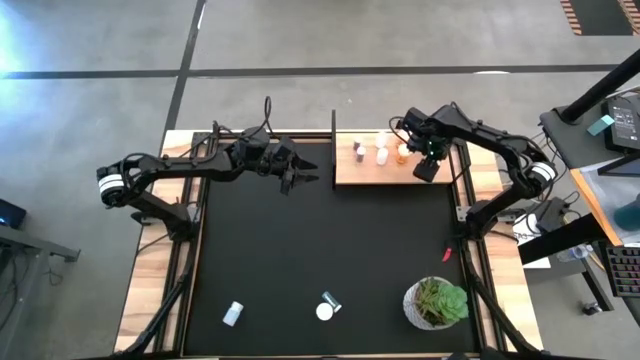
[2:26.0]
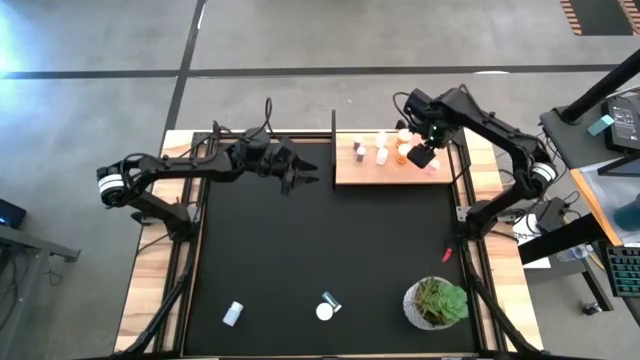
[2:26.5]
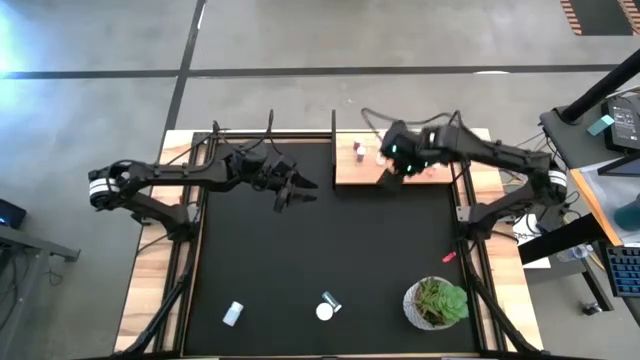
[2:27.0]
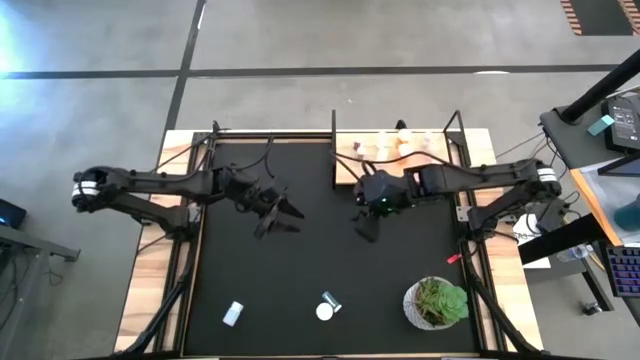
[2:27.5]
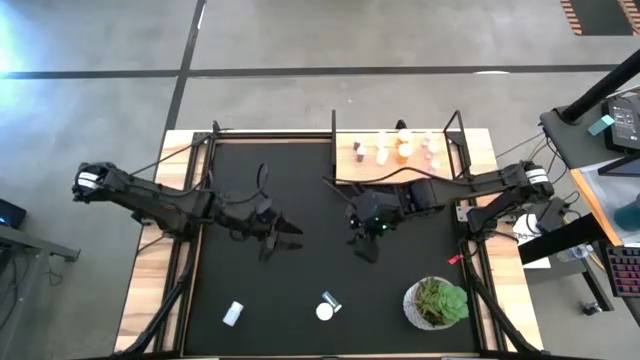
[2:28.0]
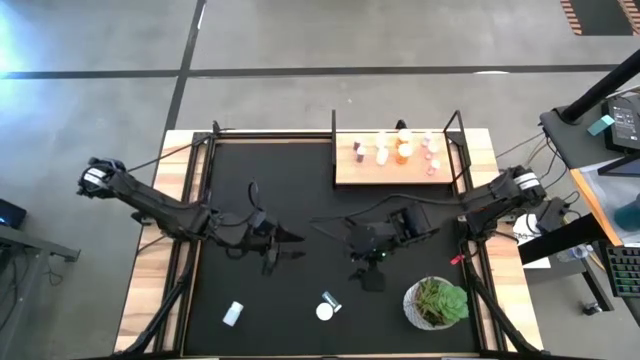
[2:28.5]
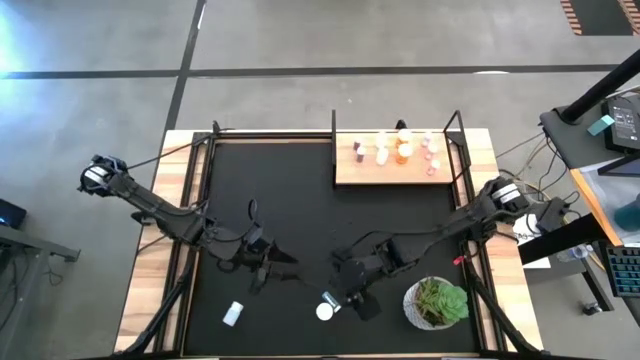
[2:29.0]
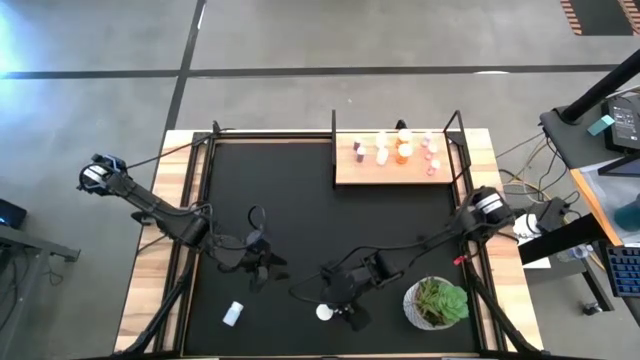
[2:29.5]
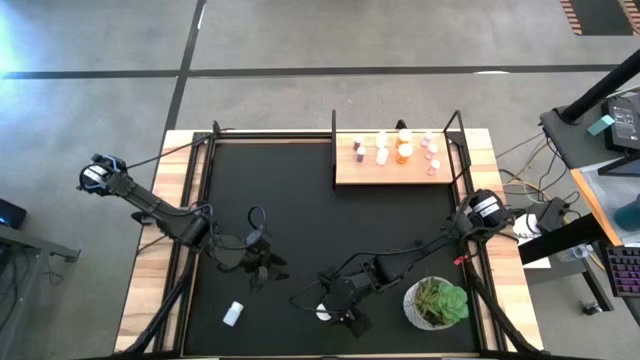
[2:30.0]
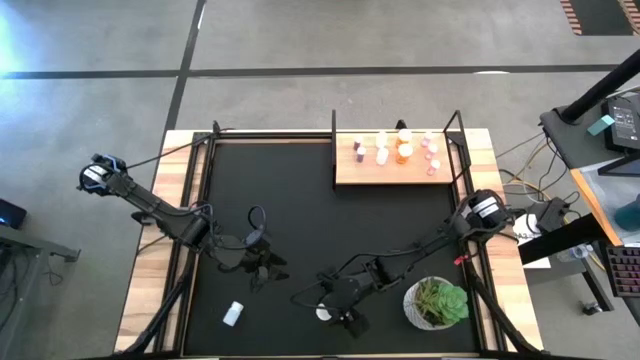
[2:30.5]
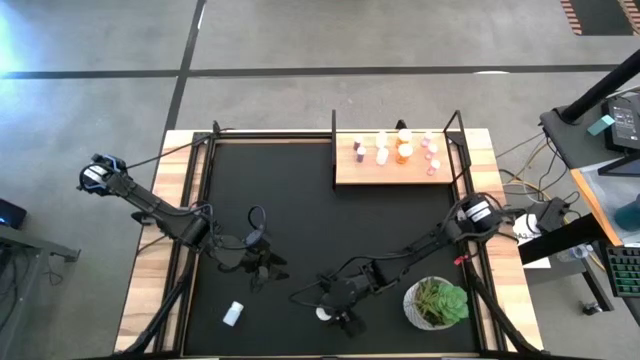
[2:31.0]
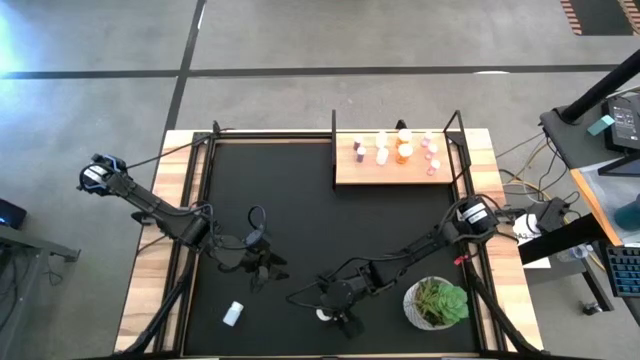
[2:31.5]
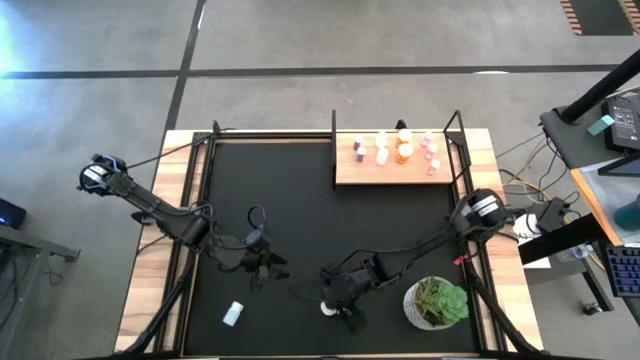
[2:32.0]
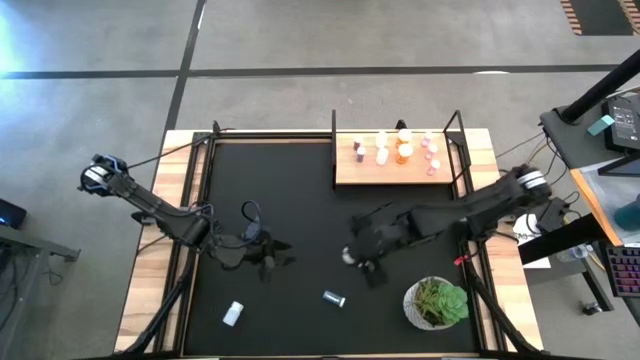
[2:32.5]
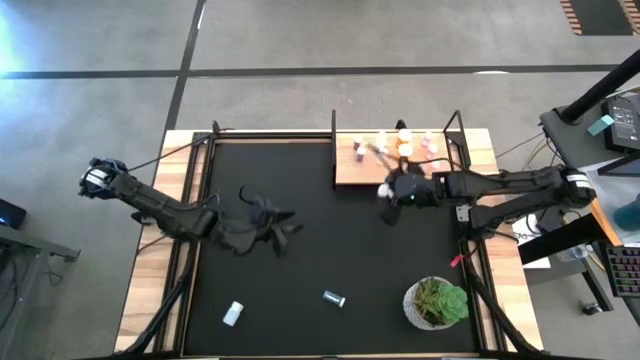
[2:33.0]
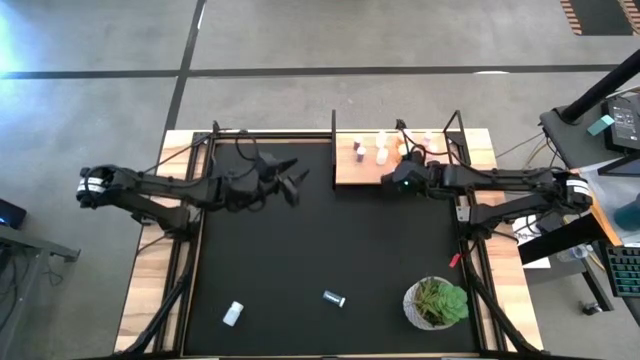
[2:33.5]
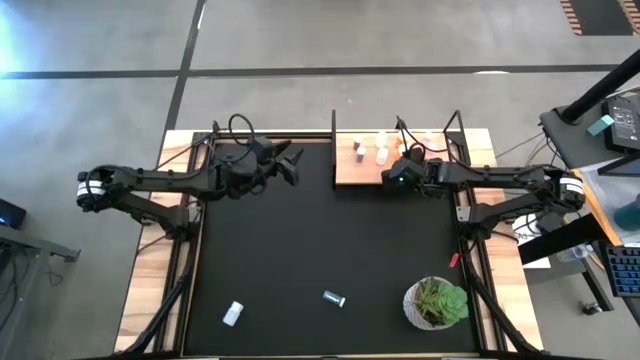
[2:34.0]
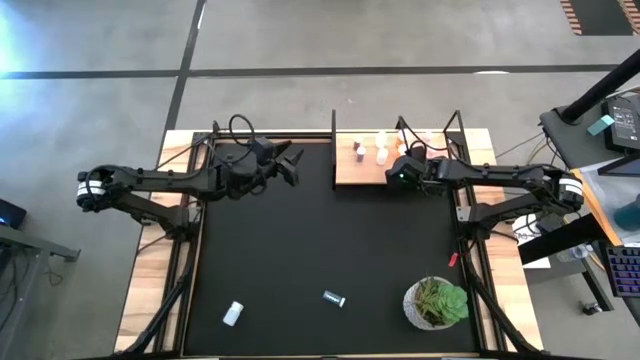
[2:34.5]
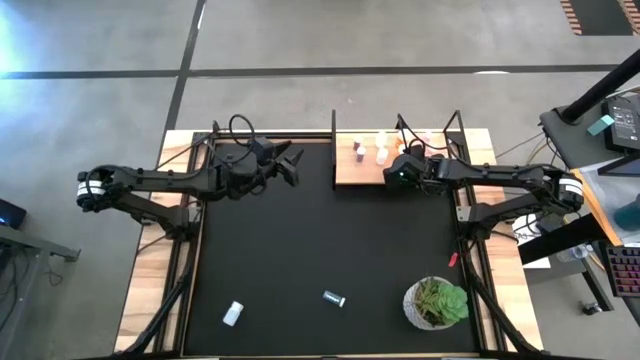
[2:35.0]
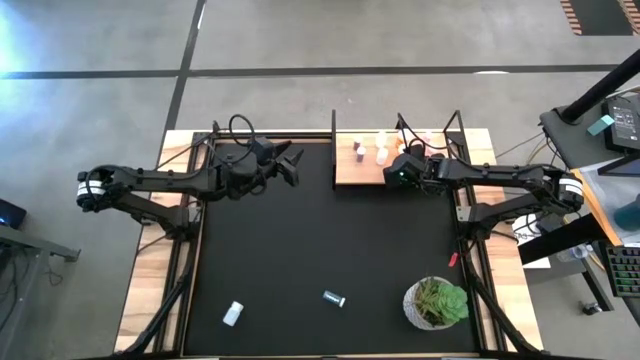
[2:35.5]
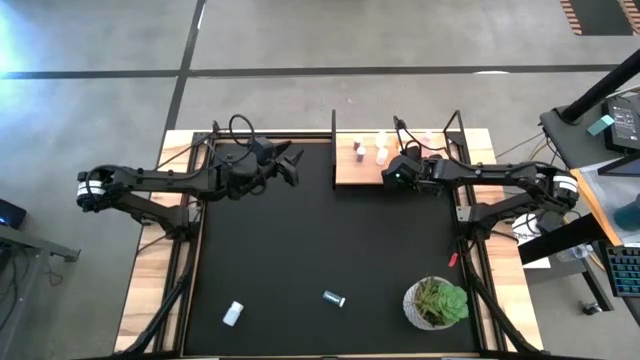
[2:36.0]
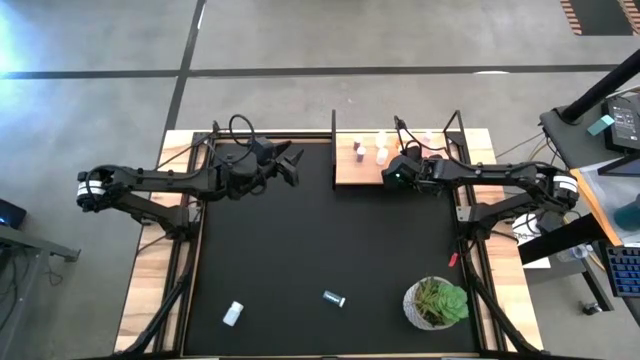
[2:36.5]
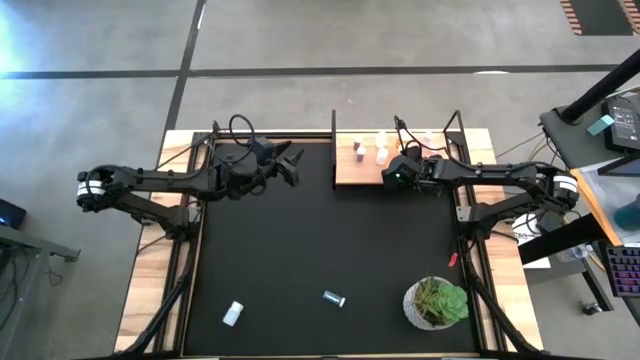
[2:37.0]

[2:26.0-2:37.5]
Task: Pick and place medicine bottles onto shelf by color
Put the orange pill bottle on the shelf aligned with the other orange pill bottles

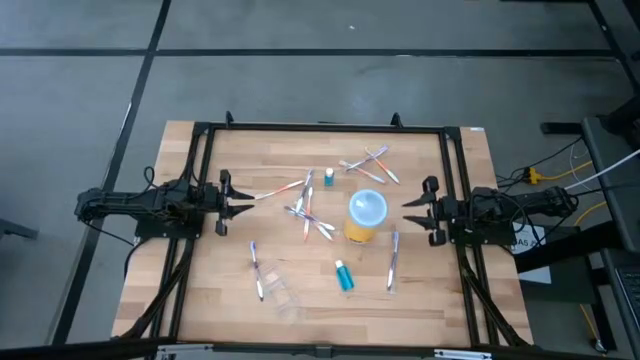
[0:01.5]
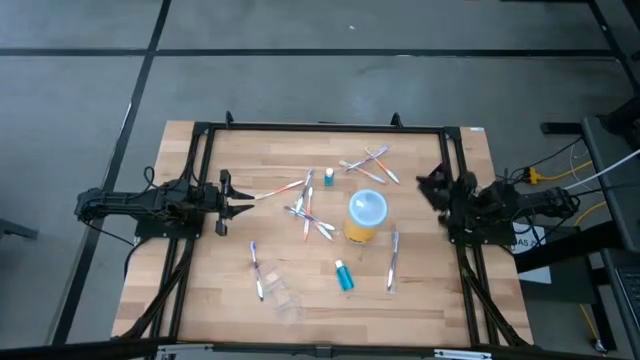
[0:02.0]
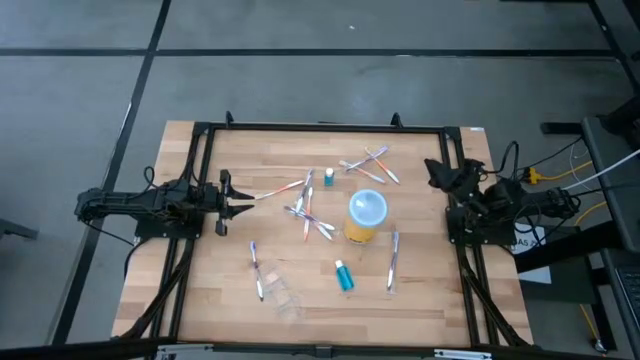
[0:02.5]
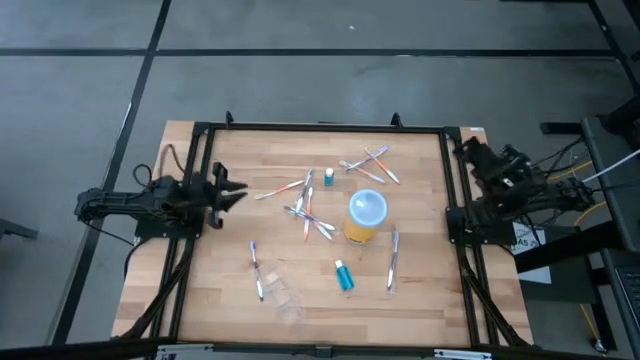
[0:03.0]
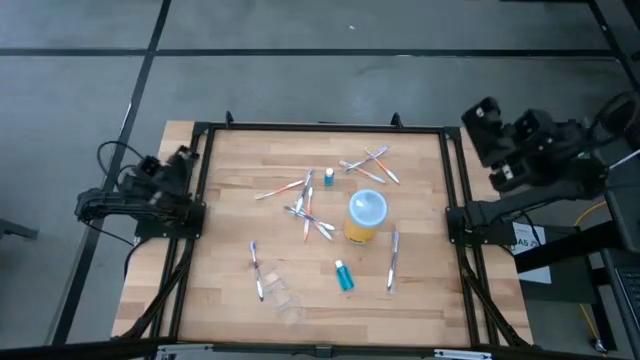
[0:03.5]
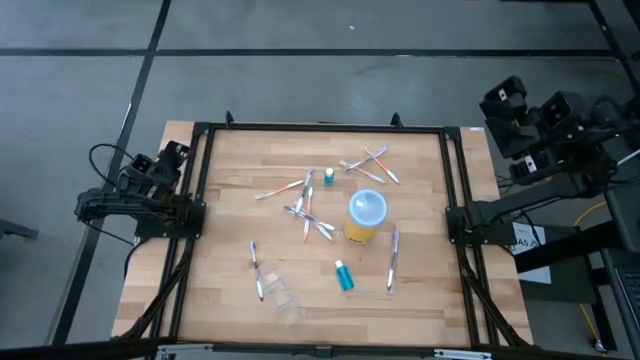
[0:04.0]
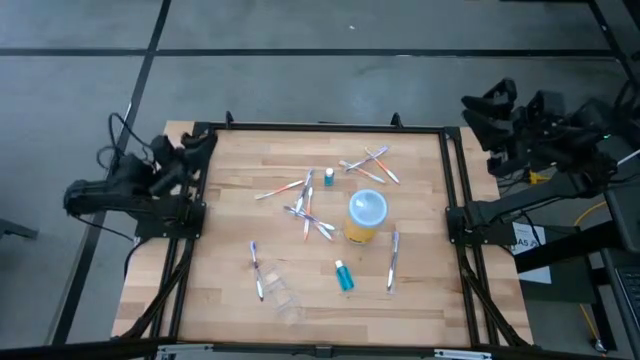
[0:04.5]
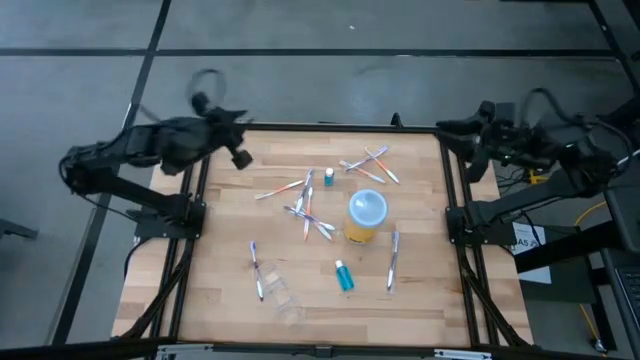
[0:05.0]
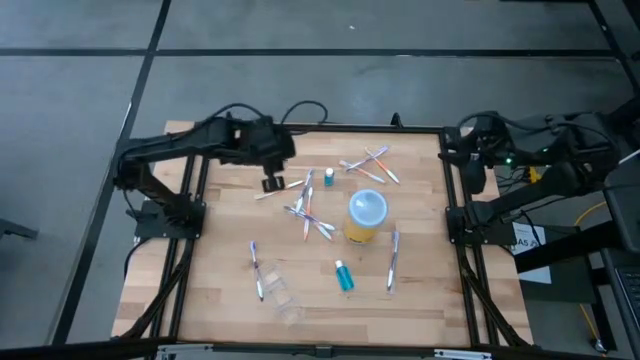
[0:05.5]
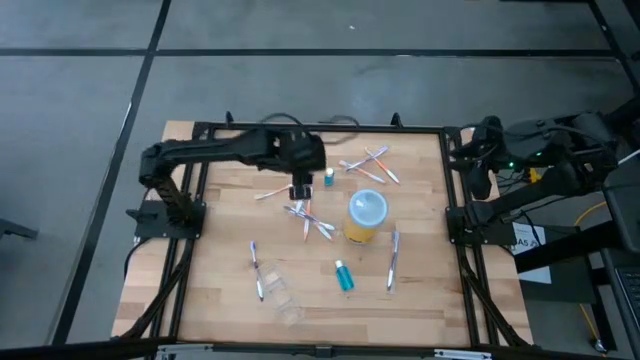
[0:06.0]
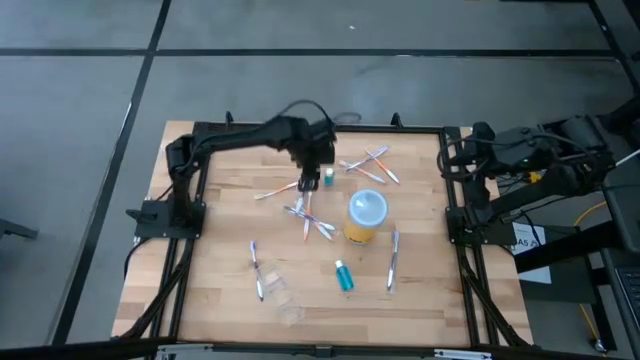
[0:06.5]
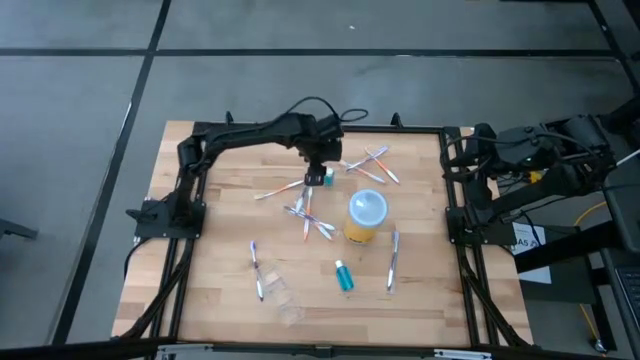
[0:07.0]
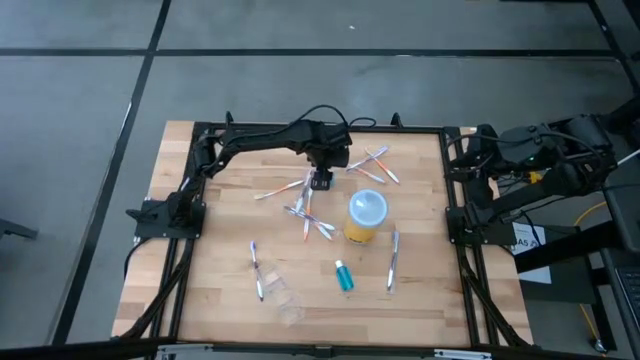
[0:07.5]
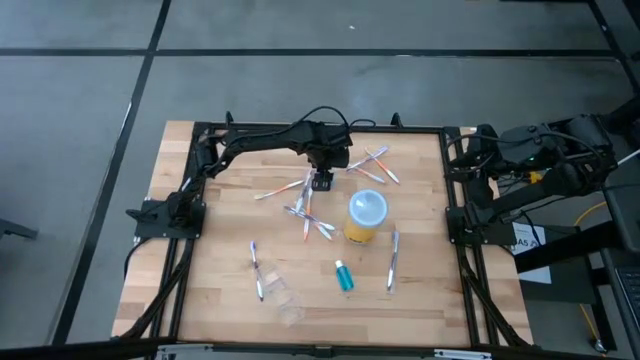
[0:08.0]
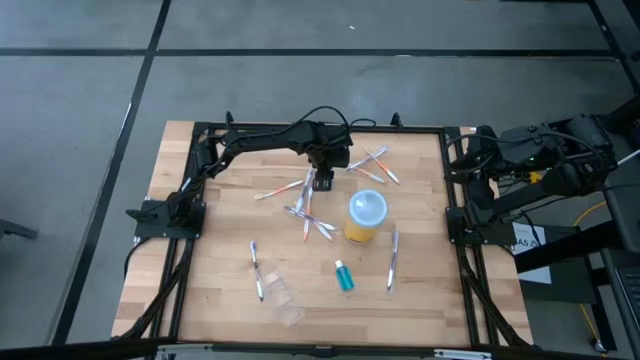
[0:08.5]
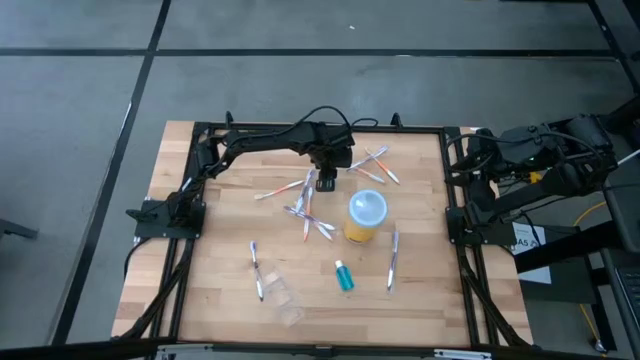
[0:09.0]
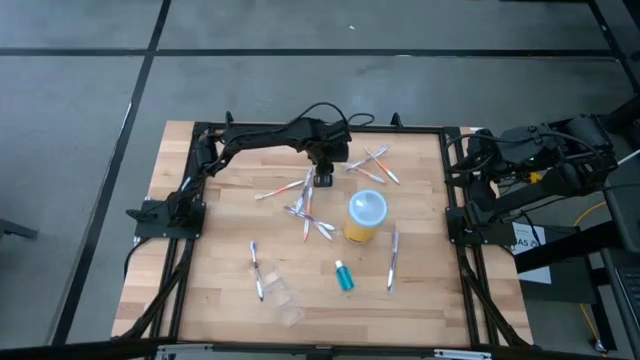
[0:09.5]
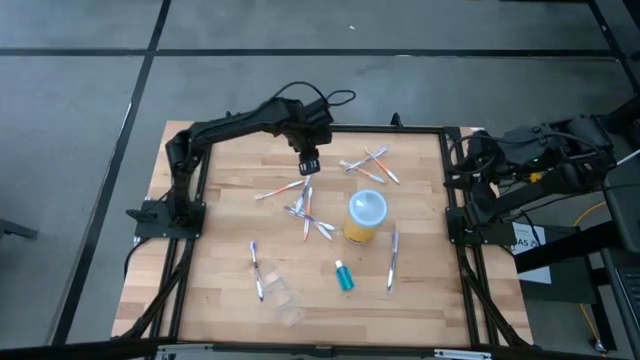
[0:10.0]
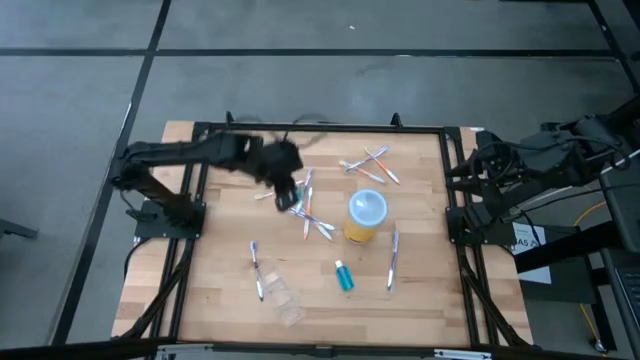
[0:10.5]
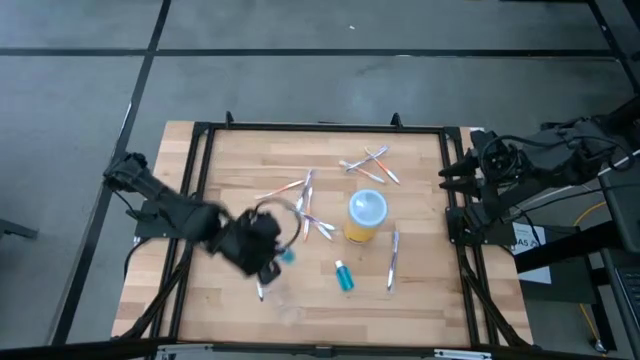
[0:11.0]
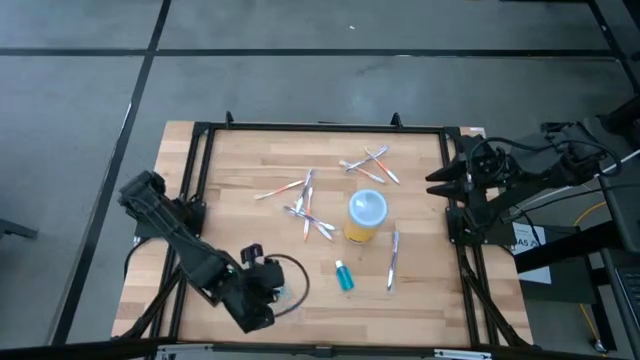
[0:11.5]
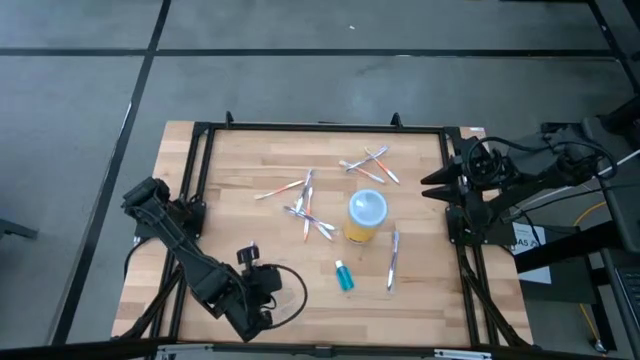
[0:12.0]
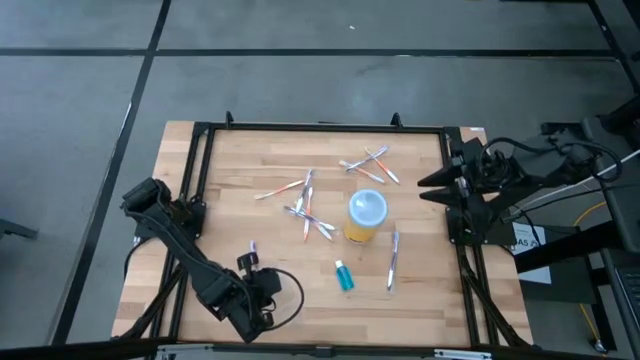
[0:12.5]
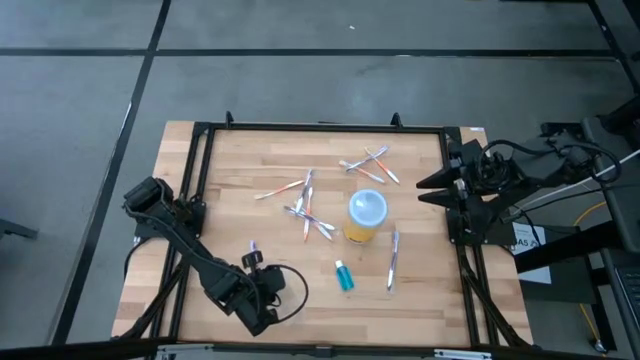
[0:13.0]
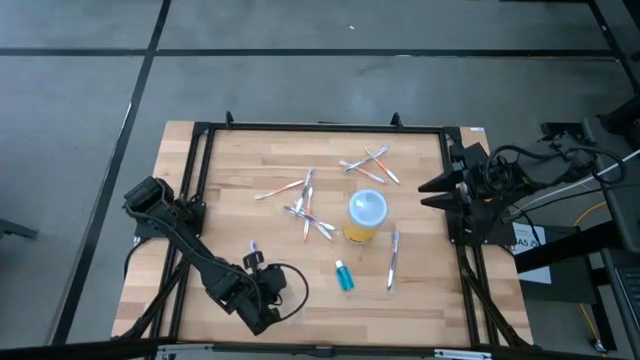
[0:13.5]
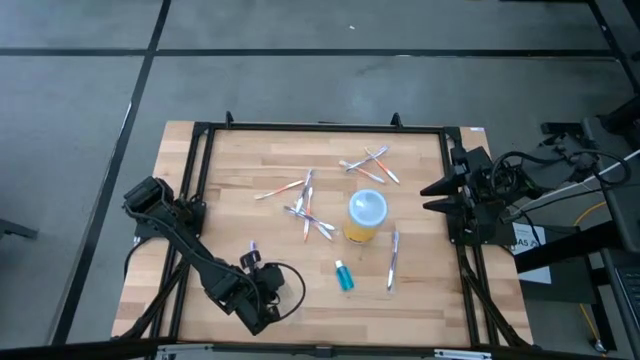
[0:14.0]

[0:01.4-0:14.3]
Task: Pick & Place toothbrushing station
Put the top mouthwash bottle into the middle of the transparent organizer
